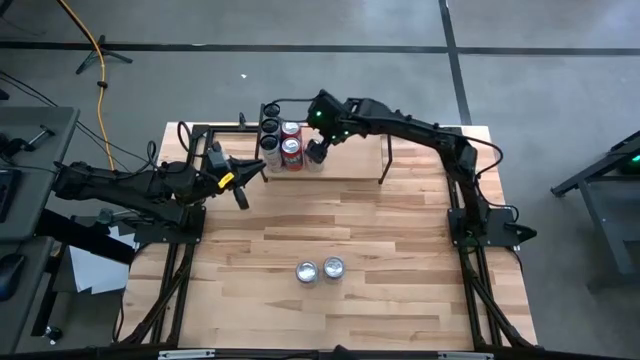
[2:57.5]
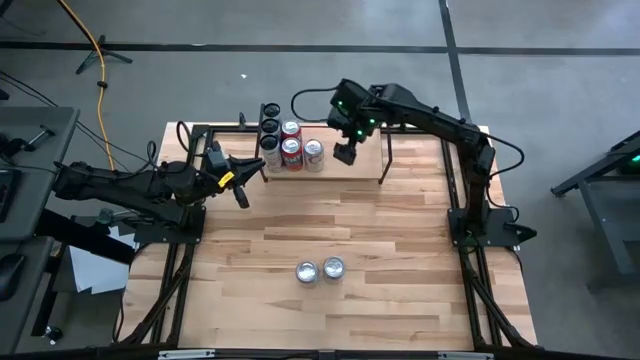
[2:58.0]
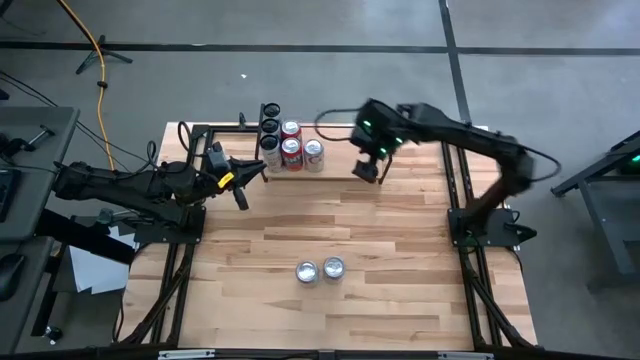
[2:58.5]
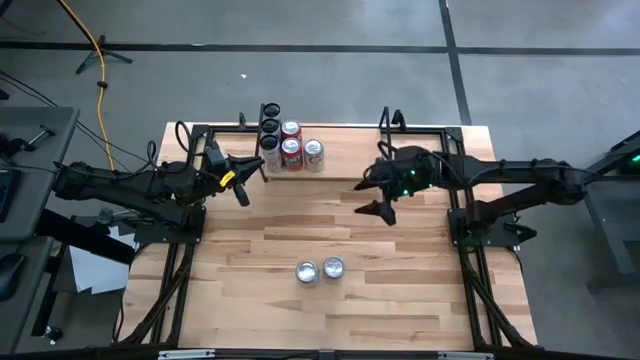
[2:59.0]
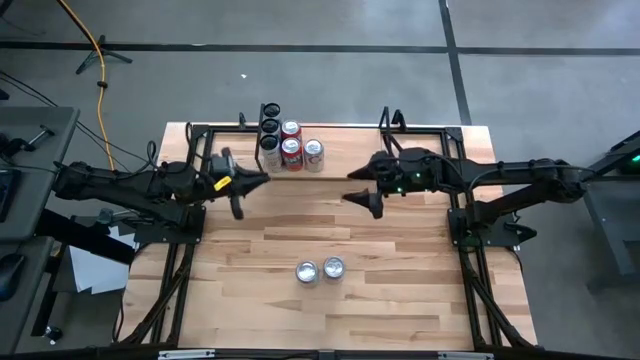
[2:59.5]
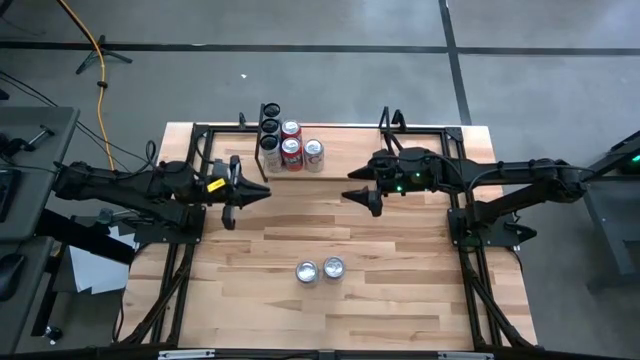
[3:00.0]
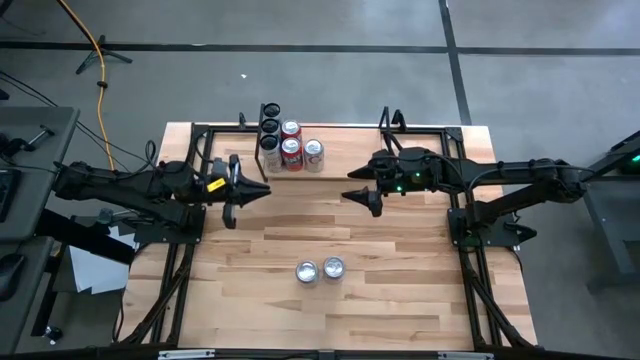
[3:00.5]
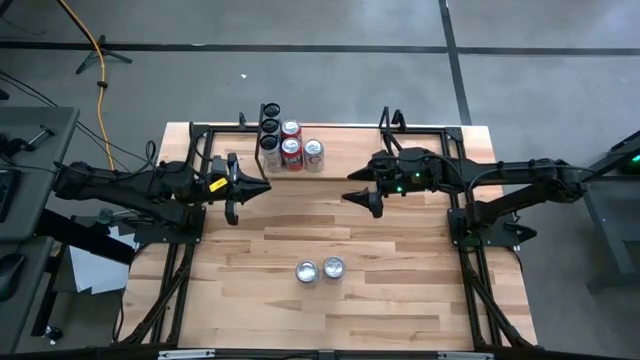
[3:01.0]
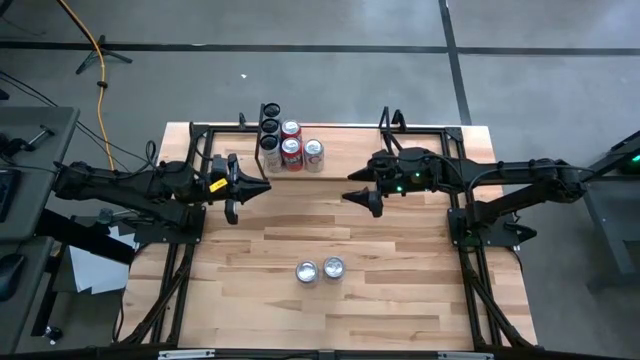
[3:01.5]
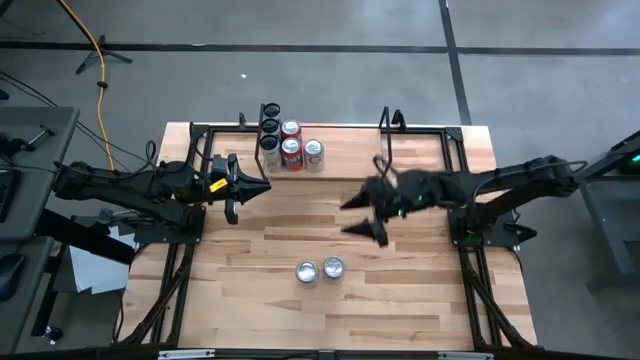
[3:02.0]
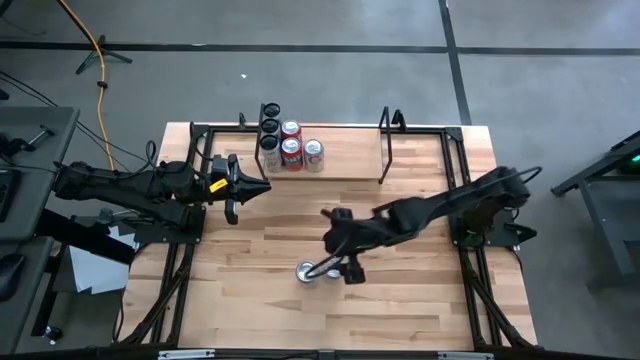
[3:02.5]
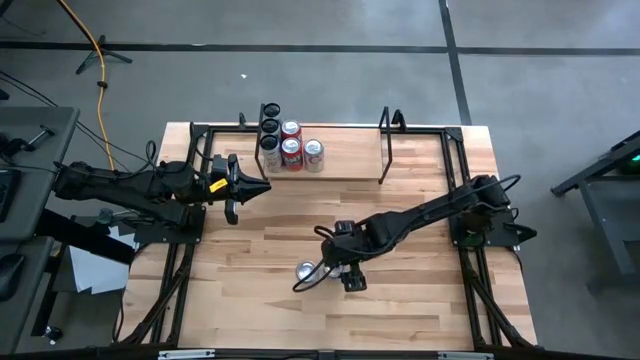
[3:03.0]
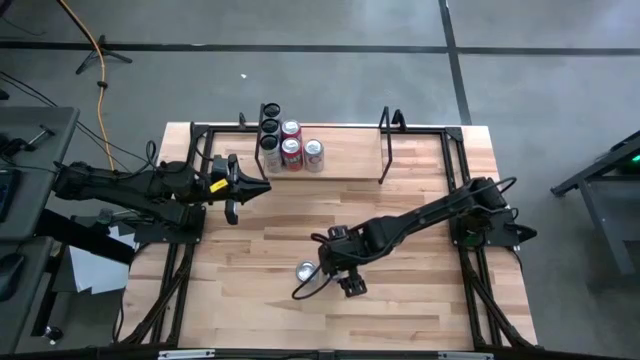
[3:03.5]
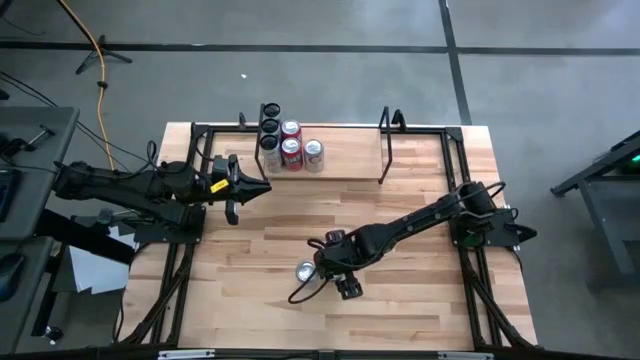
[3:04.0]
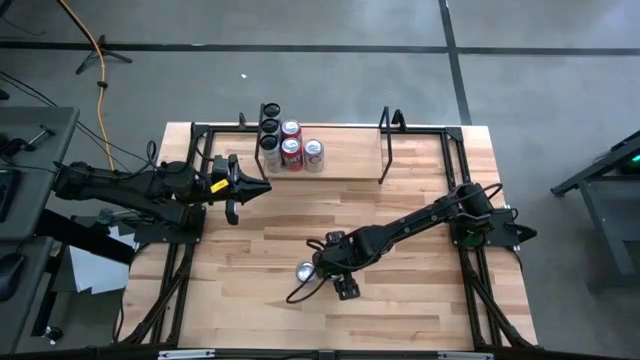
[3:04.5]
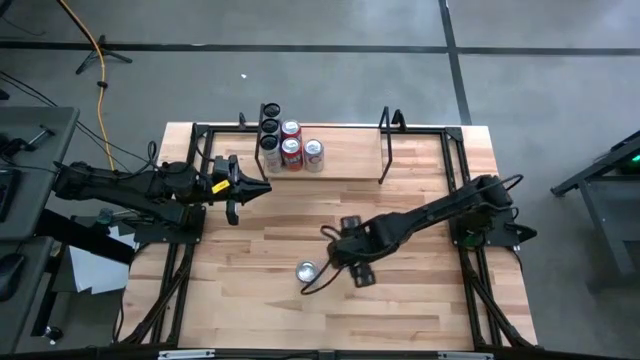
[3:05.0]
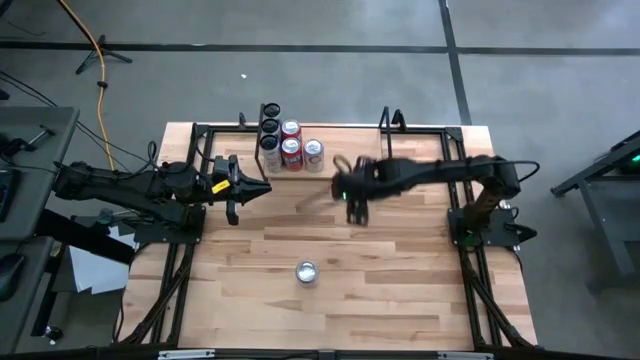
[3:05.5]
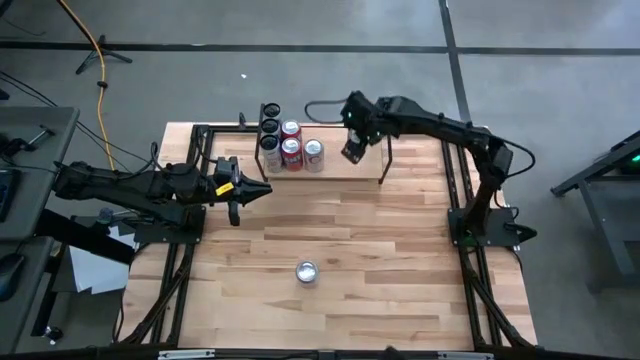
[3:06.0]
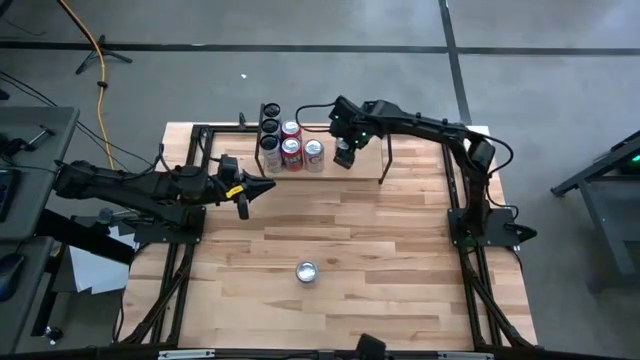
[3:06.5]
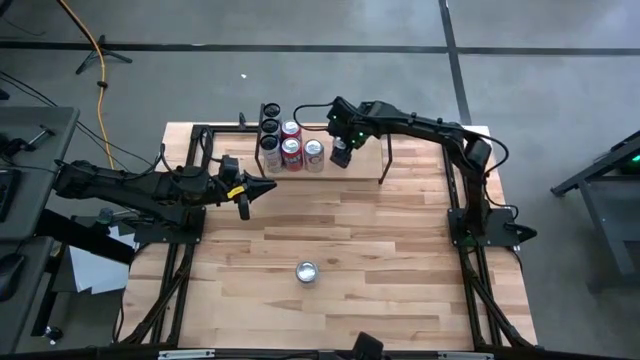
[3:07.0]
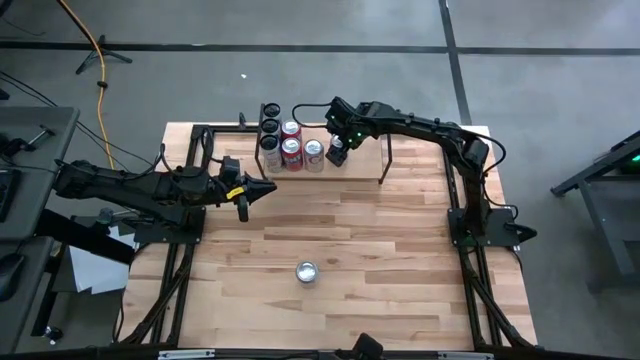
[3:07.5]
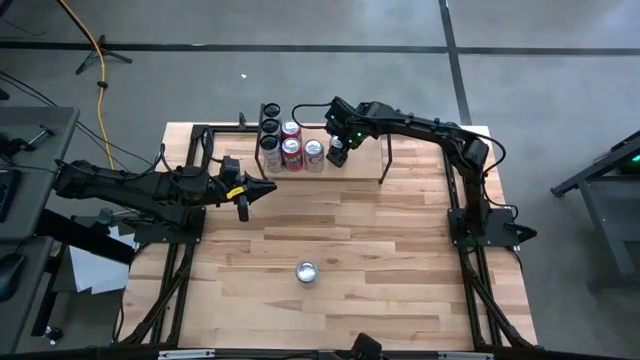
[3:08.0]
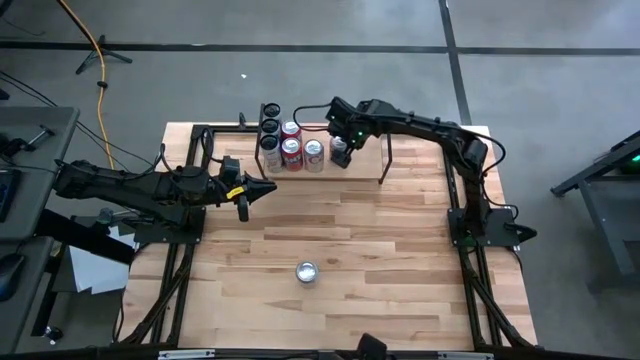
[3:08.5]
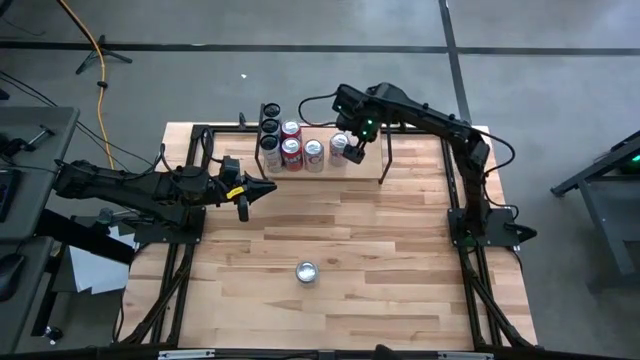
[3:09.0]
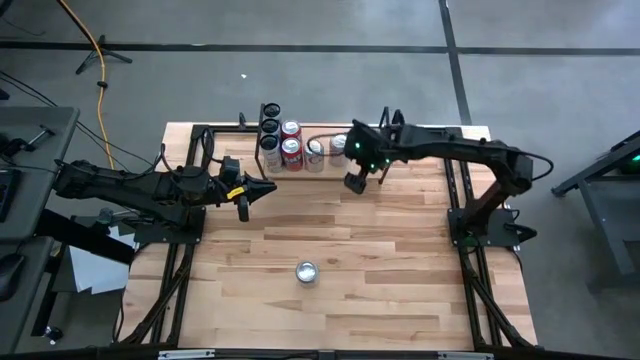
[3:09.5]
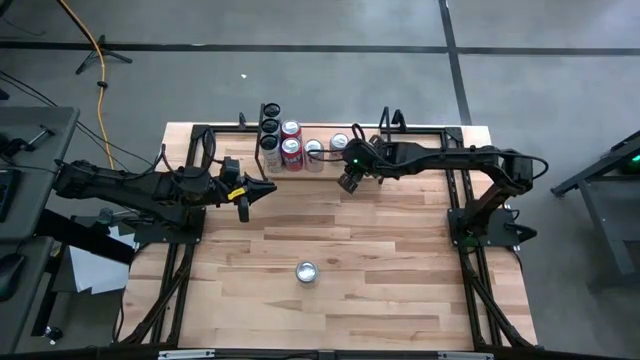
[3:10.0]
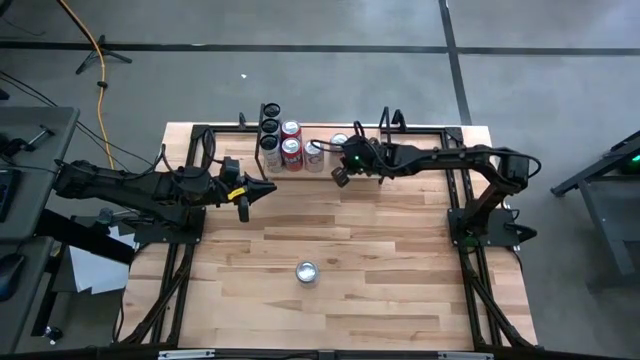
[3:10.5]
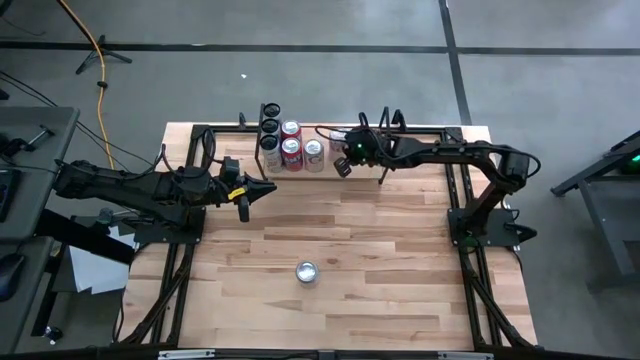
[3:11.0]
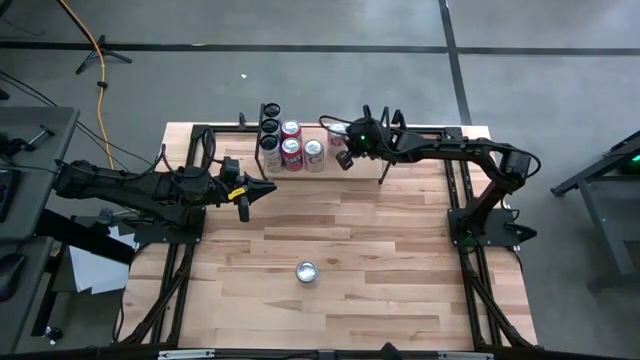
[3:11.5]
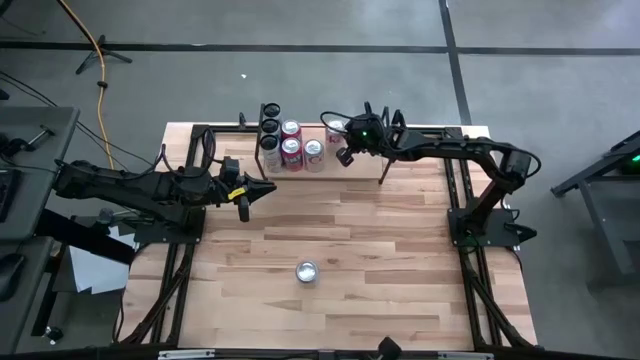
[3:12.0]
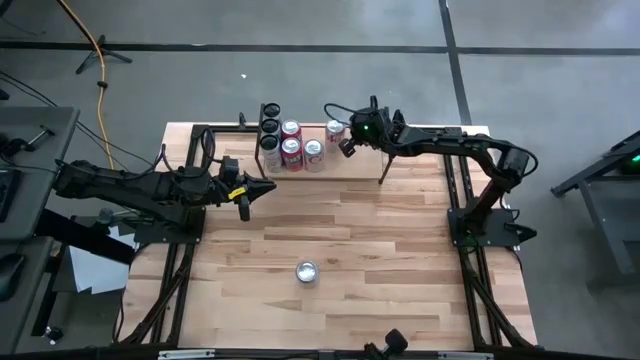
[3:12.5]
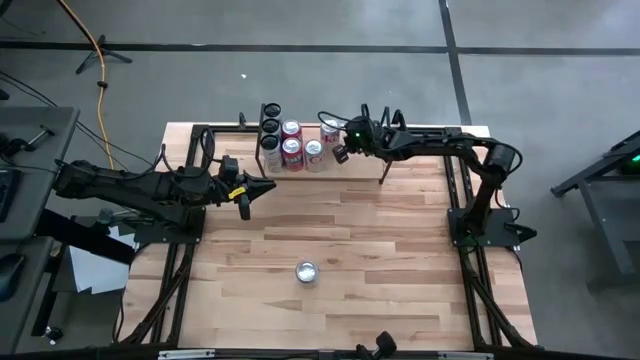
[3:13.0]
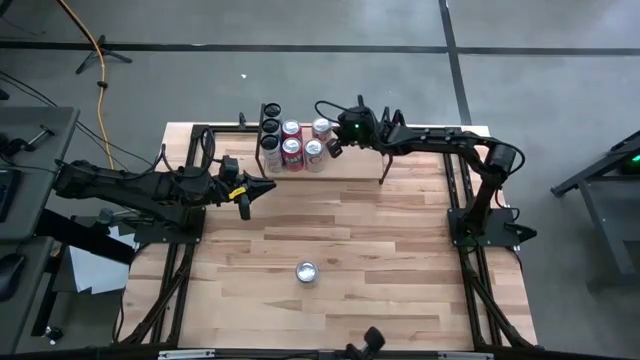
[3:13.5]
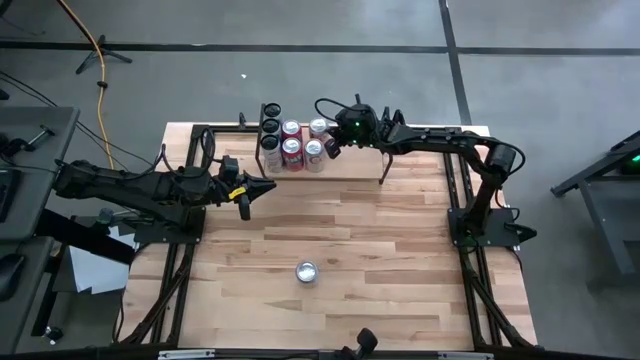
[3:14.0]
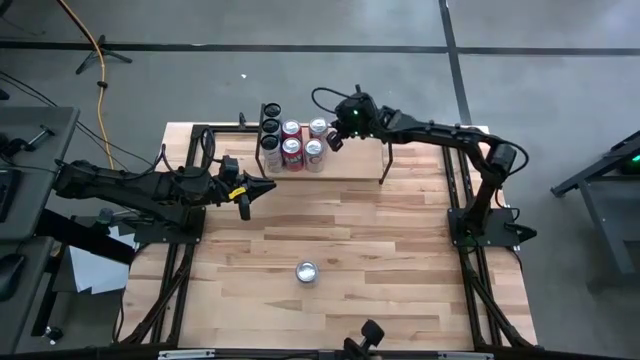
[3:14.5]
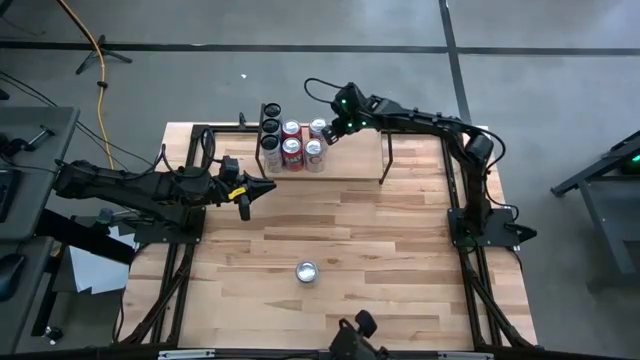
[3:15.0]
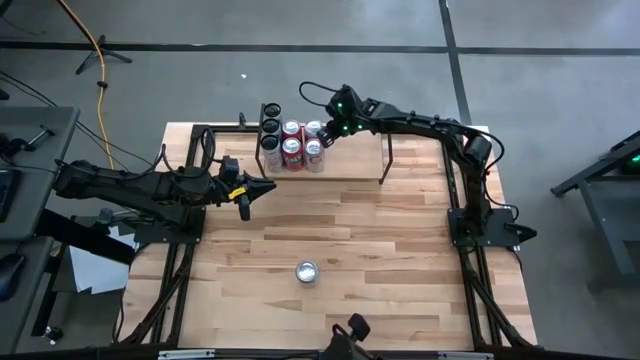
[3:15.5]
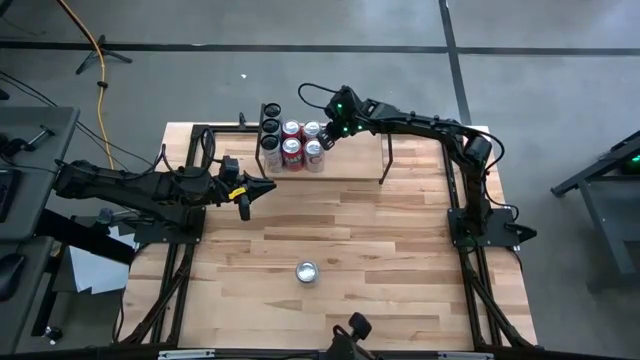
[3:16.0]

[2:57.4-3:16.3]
Task: Place canned beverage on shelf
Put the right silver soda can aligned with the other silver soda can on the shelf

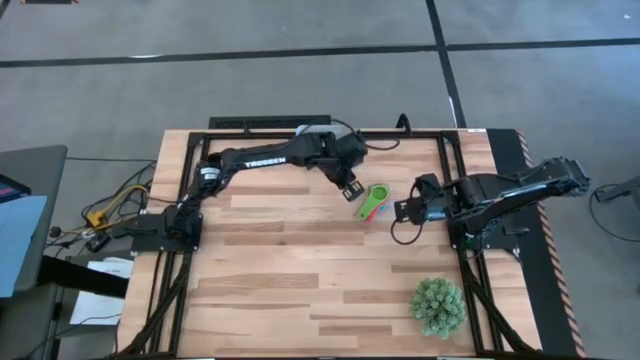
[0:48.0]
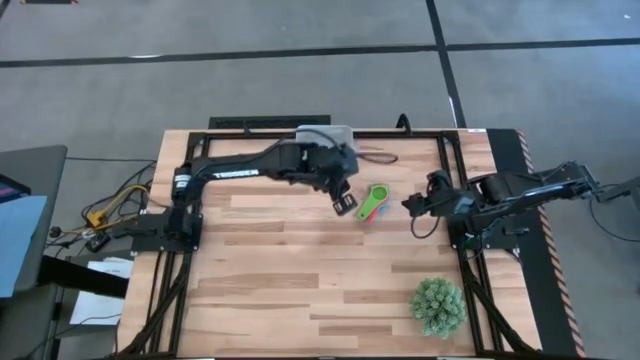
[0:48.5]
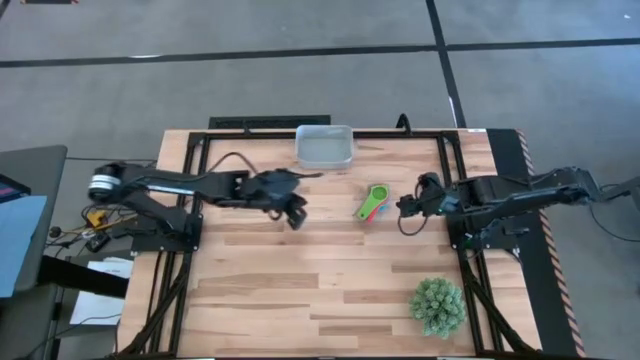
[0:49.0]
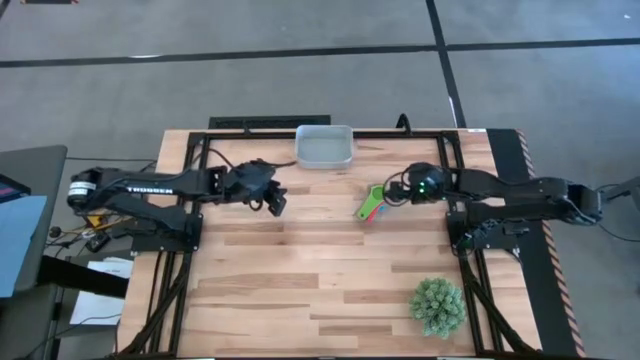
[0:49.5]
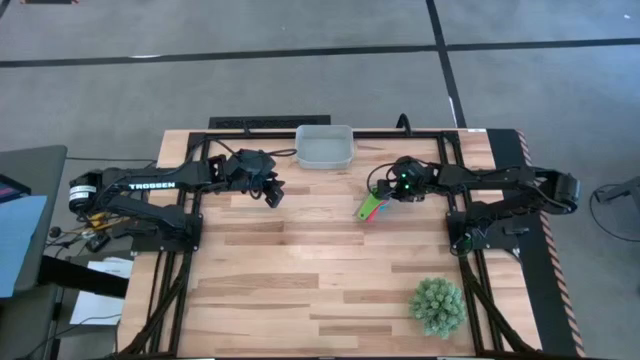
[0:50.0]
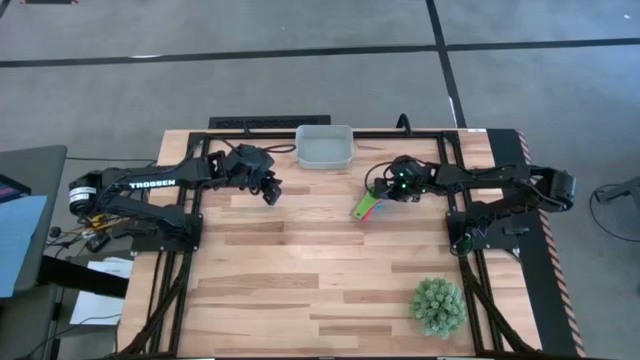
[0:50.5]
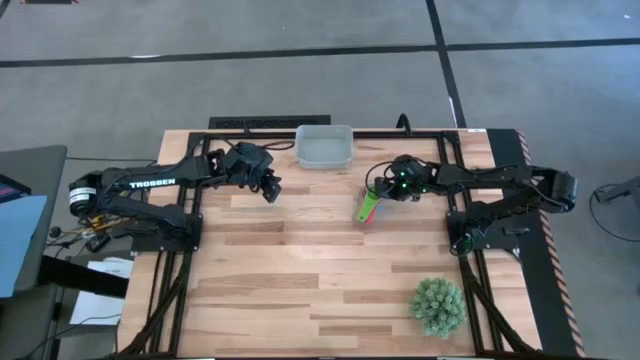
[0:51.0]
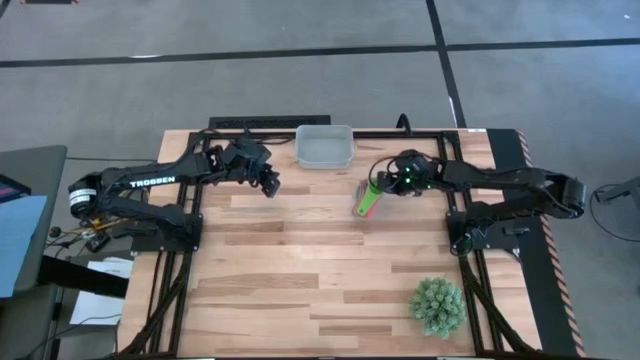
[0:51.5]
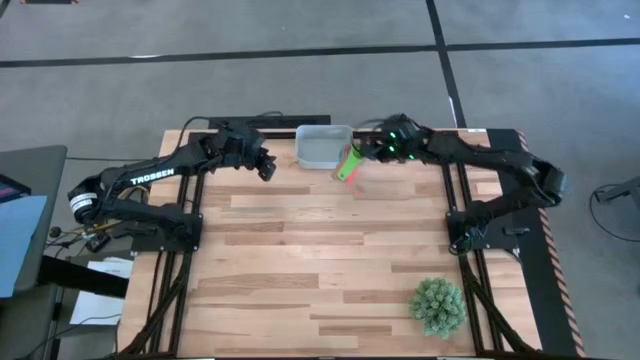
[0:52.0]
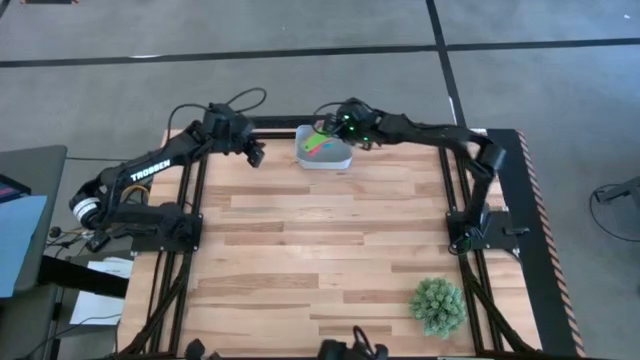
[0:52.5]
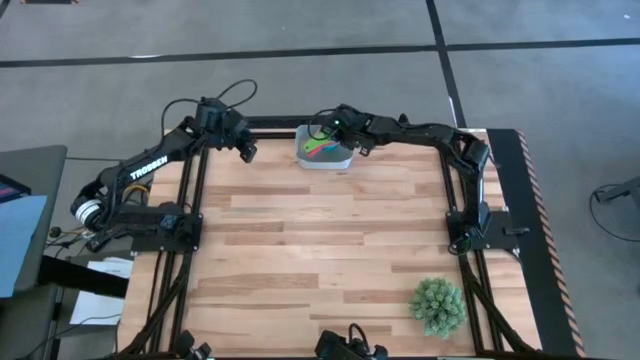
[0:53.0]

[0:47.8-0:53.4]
Task: Nest measuring cups in basket
Put the nested measuring cups into the gray bin
